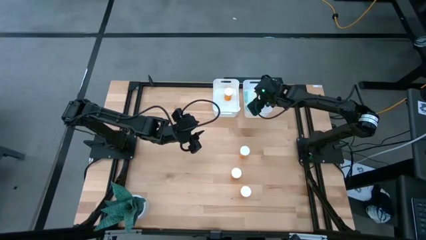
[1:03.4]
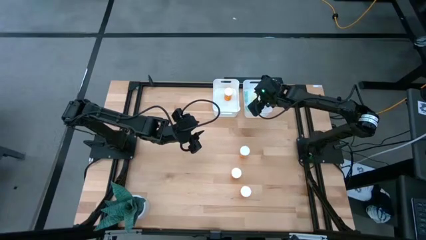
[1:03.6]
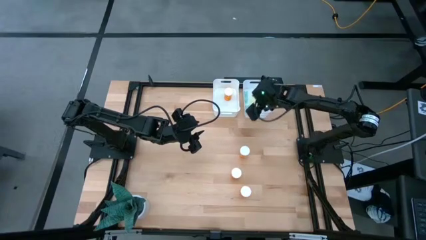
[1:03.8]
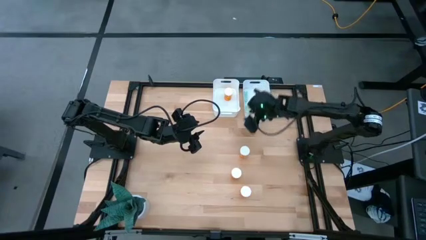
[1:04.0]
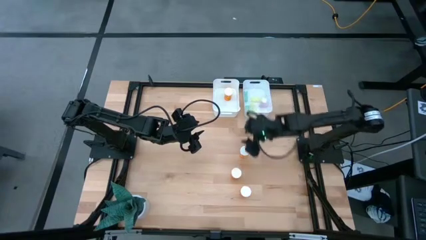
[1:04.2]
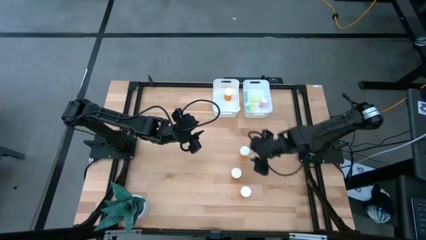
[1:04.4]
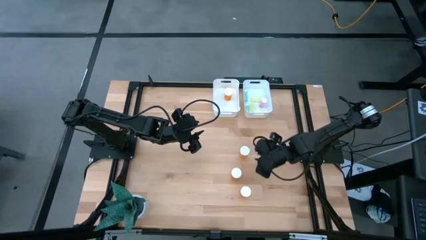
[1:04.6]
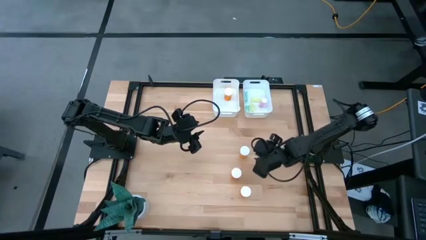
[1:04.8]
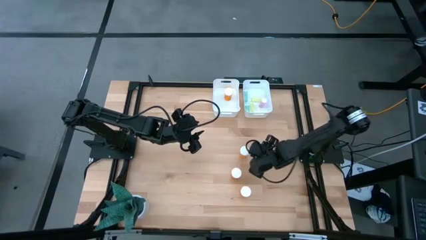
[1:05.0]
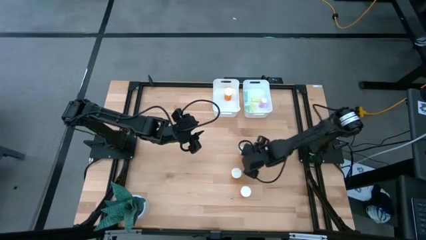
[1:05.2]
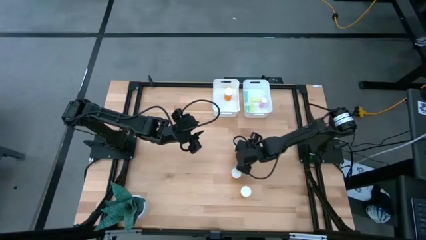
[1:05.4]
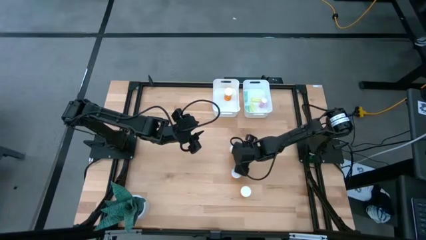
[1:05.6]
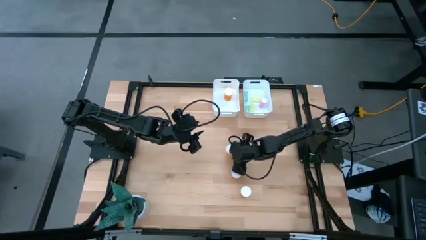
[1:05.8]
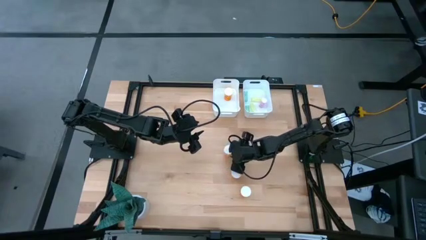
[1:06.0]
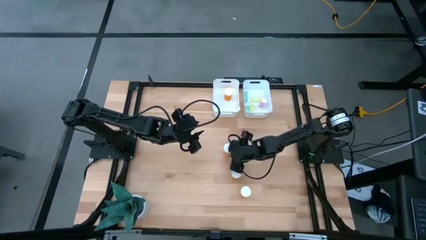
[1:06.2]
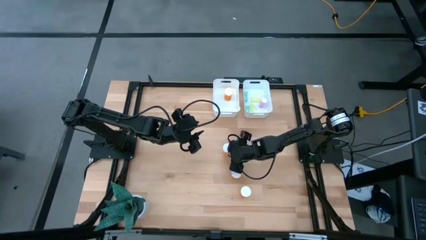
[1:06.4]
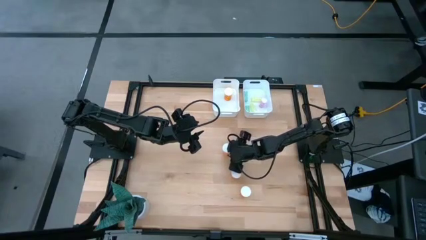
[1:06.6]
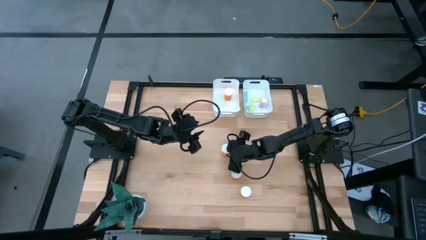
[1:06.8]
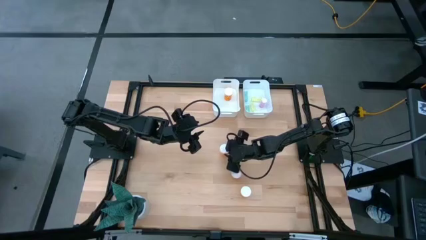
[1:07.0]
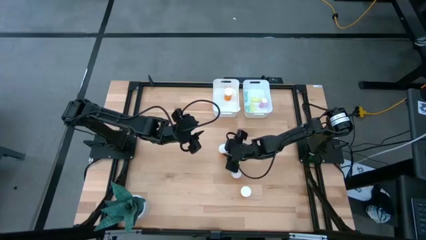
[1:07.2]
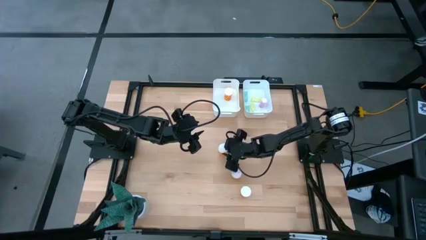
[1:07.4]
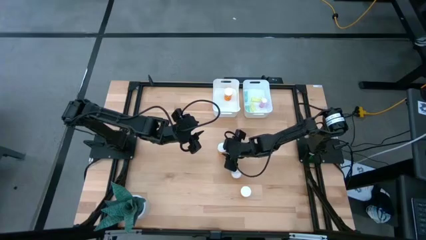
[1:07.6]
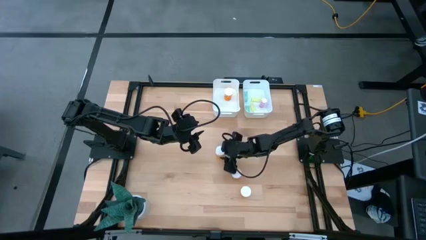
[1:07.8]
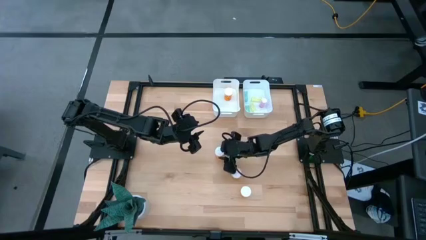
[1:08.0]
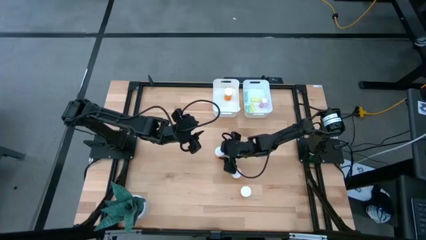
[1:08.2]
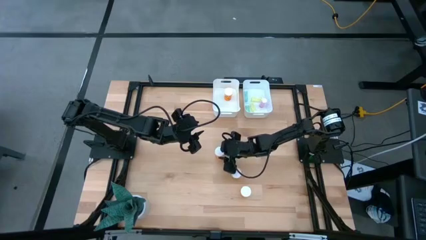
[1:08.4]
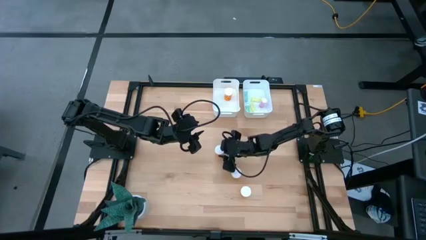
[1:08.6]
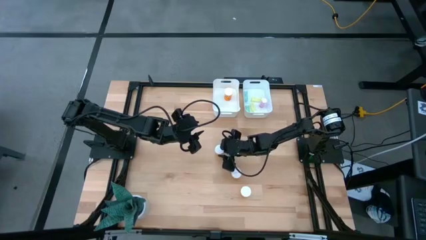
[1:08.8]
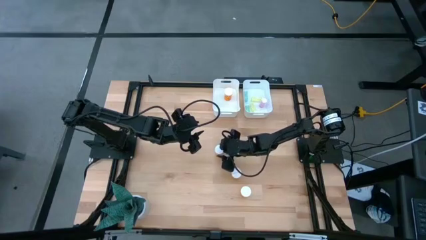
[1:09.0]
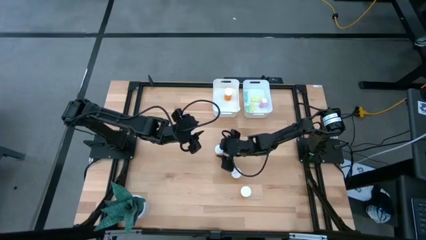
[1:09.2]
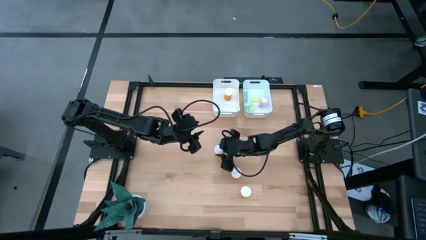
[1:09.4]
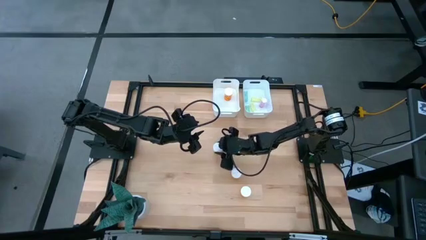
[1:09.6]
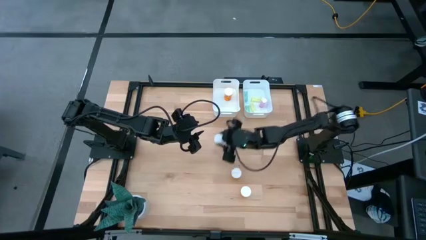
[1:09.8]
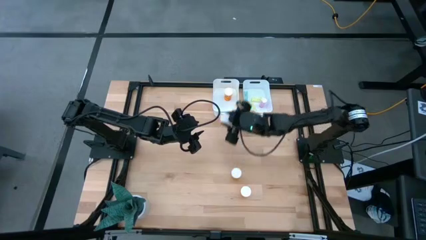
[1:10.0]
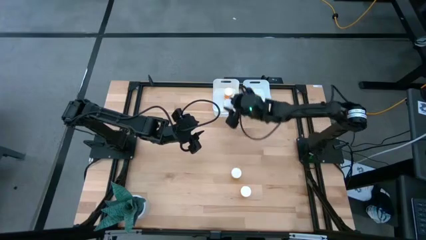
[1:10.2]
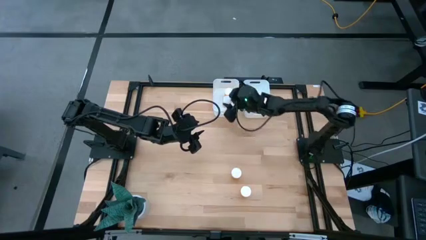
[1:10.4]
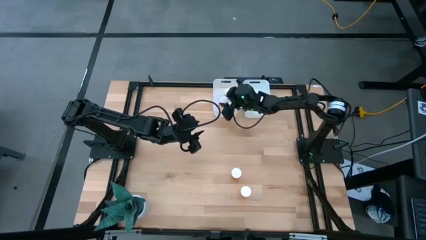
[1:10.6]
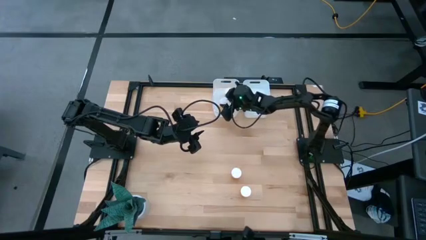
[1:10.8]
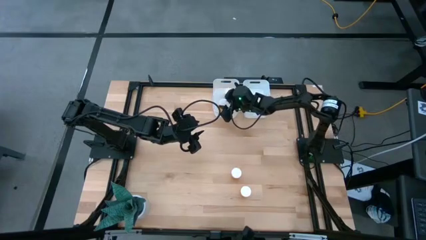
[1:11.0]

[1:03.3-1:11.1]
Task: Pick and place medicine bottles into bin by pill shape (circle, oval)
Put the large orange medicine pill bottle into the left white bin

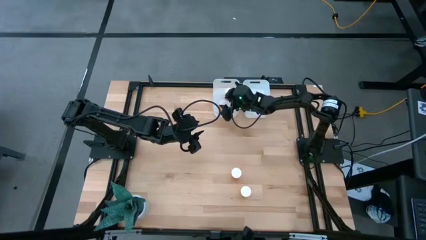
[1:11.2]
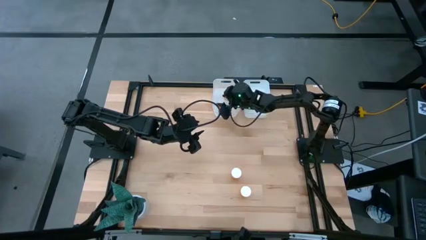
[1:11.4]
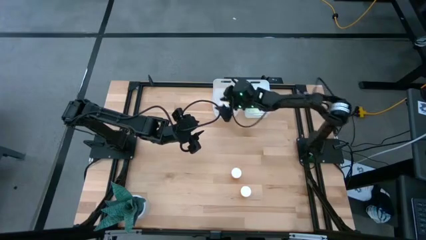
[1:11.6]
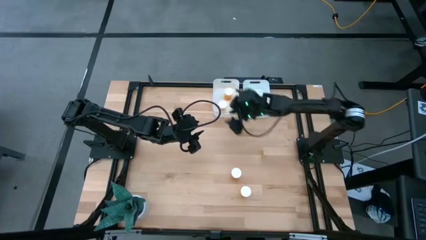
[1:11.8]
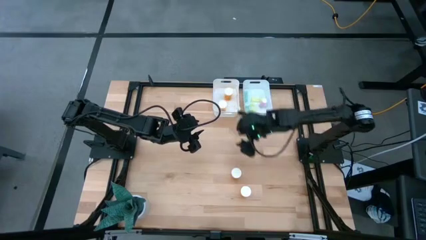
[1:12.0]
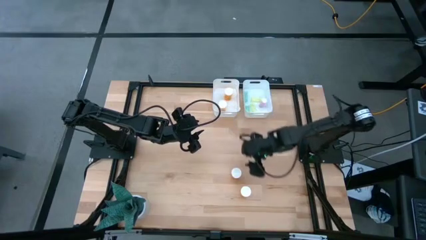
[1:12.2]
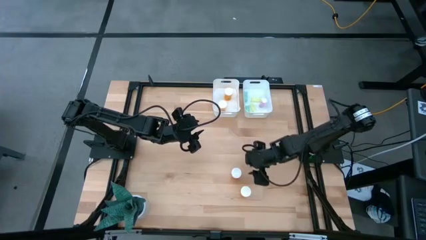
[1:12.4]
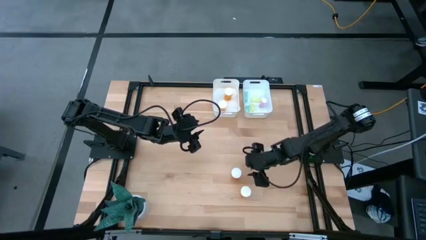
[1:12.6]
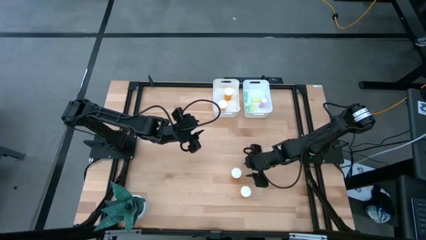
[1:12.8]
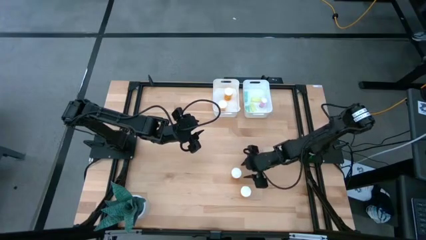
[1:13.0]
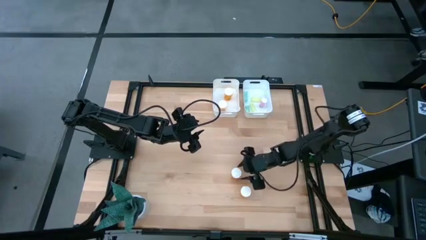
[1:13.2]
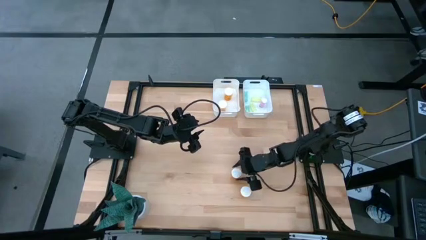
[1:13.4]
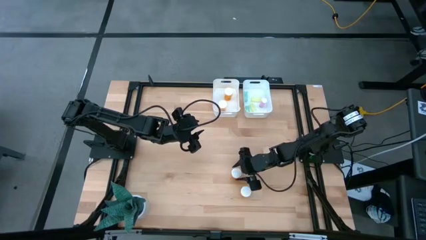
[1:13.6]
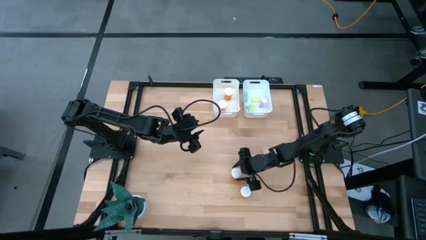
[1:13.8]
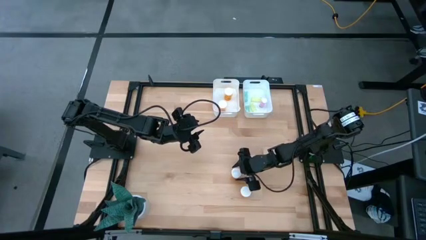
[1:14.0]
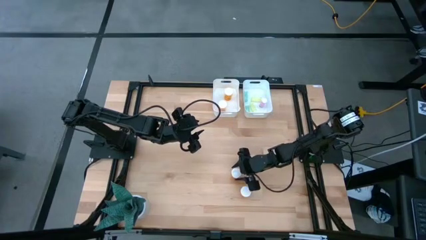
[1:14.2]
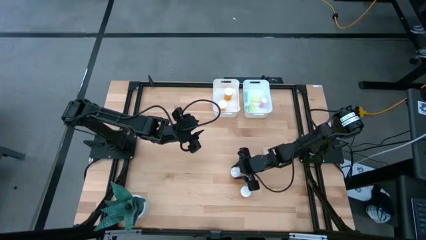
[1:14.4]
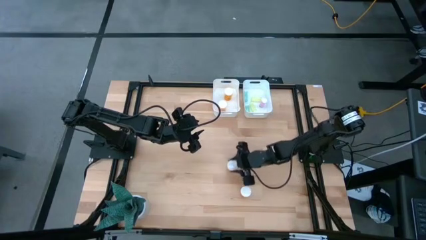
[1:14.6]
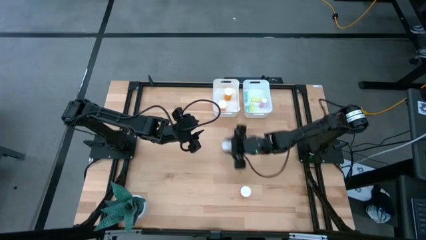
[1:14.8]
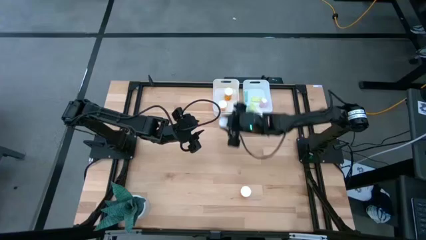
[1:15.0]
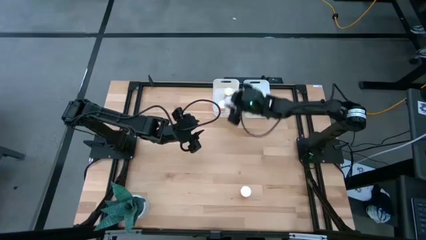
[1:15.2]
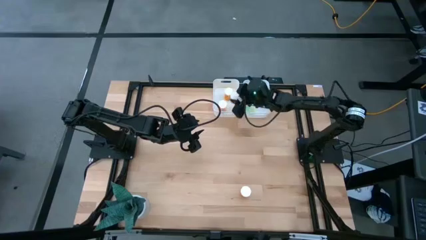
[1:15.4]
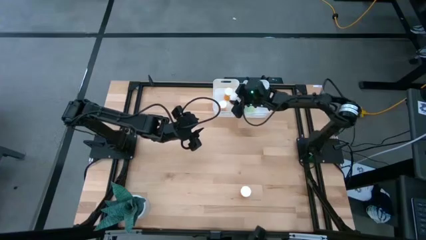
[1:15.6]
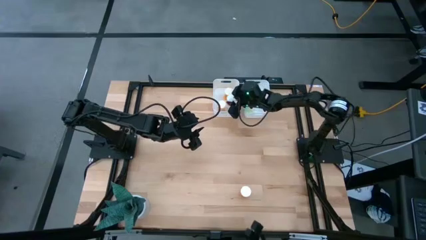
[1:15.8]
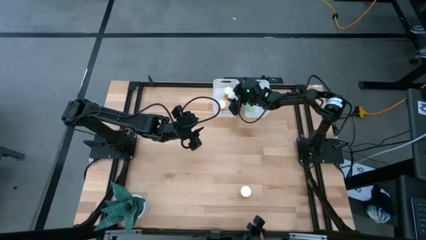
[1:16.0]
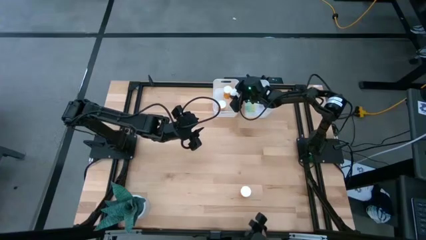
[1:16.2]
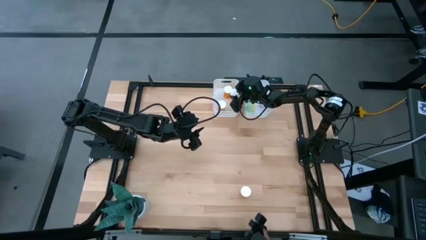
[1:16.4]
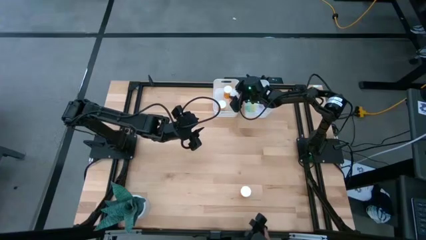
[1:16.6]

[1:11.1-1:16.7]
Put the large orange medicine pill bottle into the left white bin

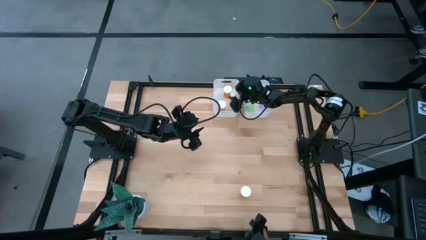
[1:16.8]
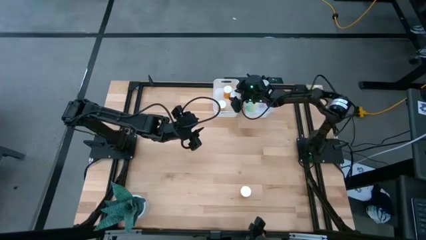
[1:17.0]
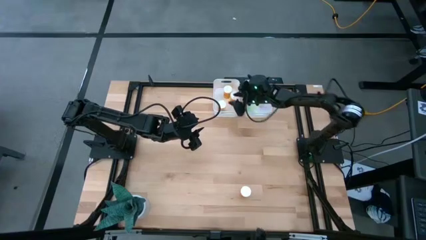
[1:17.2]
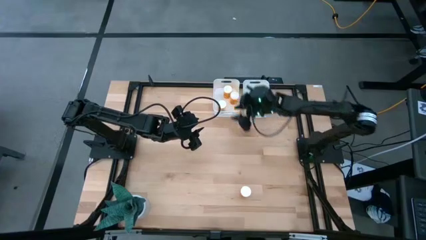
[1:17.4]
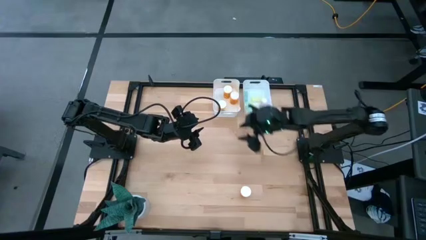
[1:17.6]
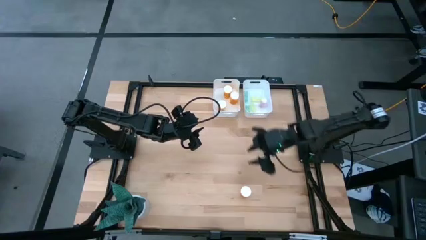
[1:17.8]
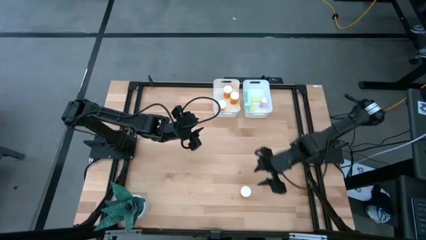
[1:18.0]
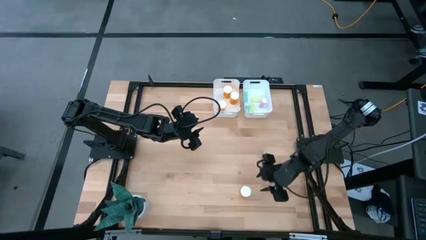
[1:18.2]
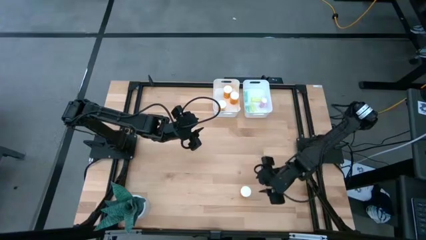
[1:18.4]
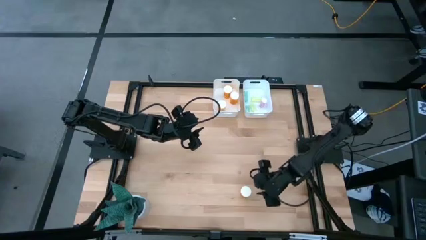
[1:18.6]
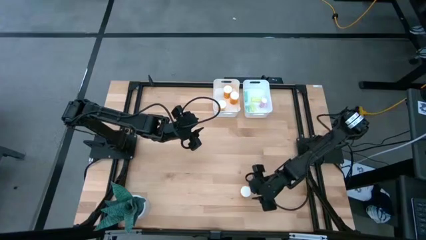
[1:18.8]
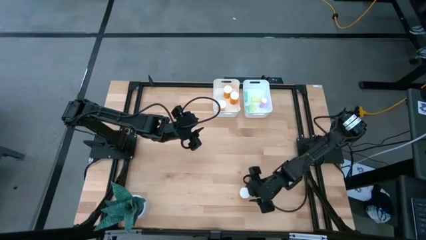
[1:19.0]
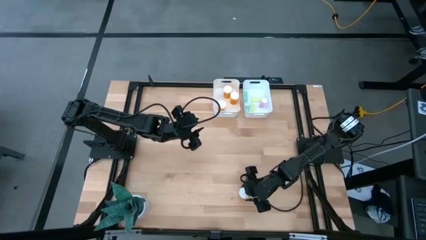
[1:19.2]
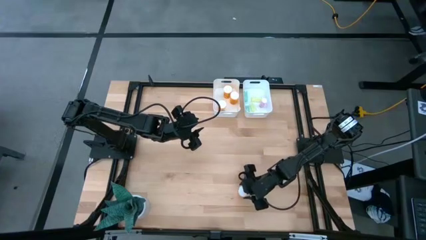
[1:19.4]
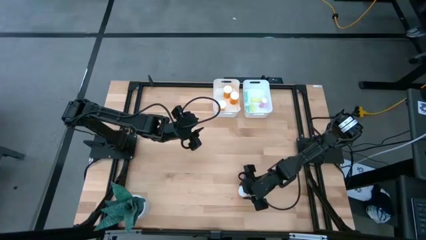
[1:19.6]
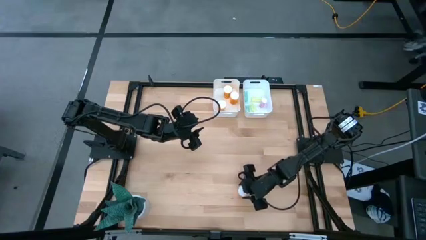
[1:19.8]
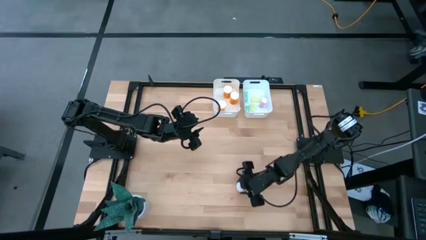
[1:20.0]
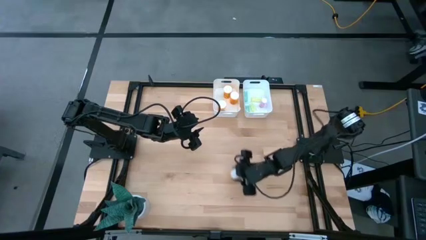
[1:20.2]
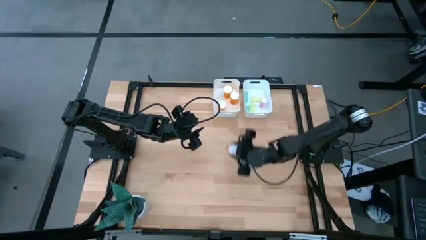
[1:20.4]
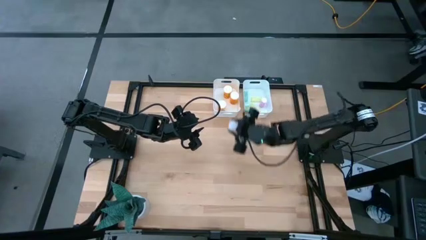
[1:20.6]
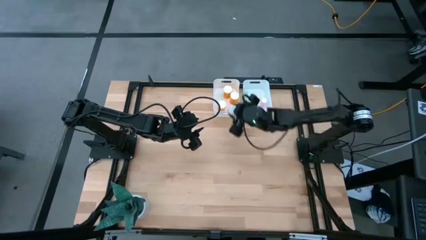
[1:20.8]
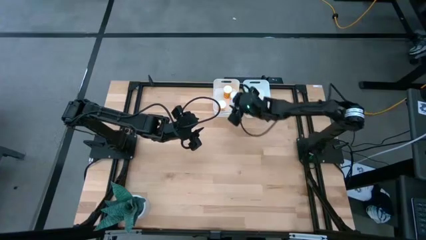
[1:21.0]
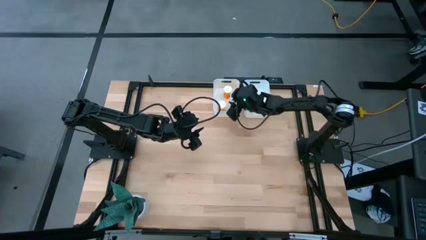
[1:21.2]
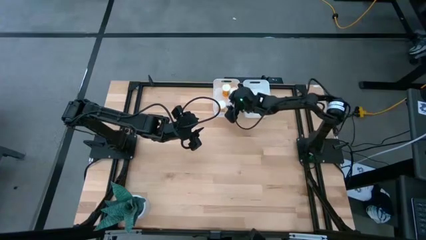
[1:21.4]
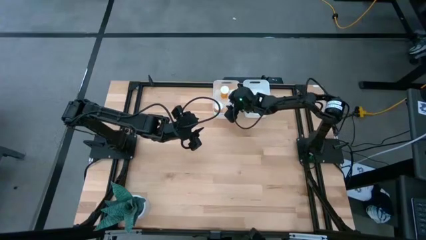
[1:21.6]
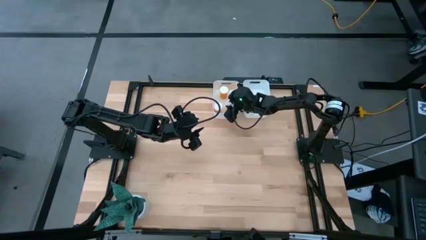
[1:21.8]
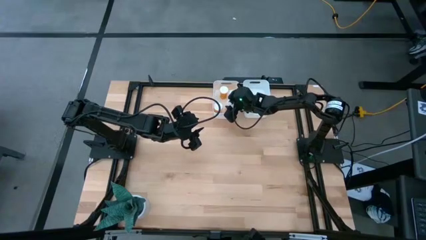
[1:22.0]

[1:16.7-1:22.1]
Put the large orange medicine pill bottle into the left white bin
